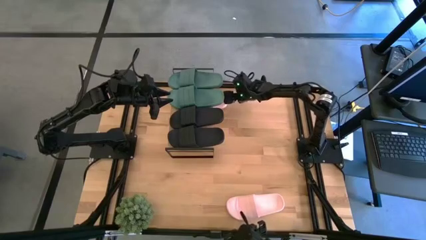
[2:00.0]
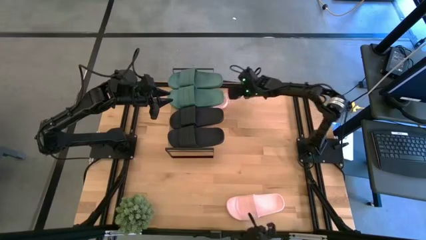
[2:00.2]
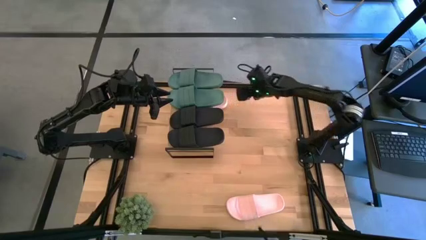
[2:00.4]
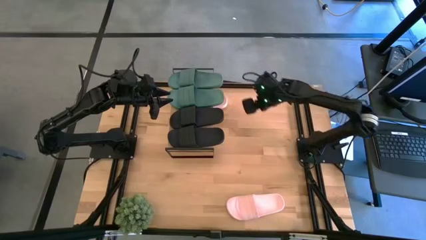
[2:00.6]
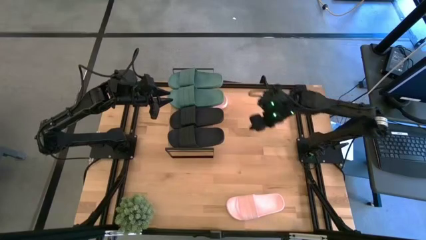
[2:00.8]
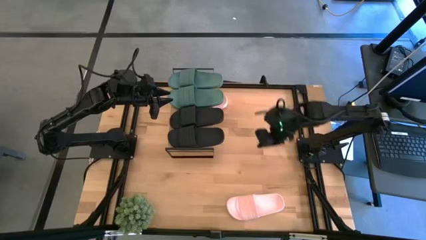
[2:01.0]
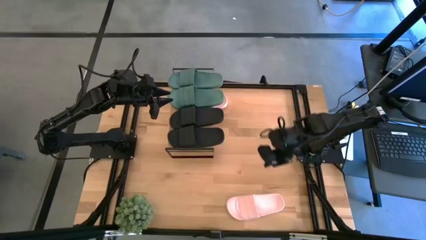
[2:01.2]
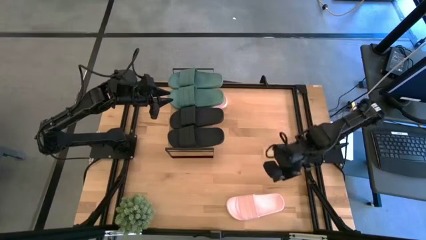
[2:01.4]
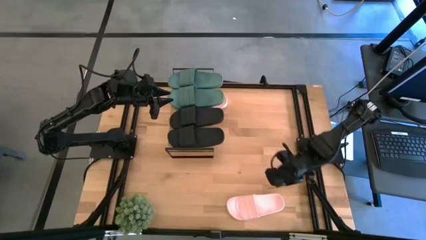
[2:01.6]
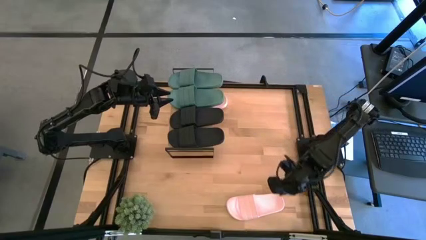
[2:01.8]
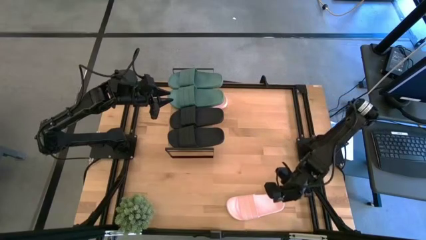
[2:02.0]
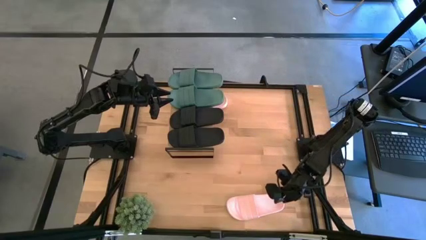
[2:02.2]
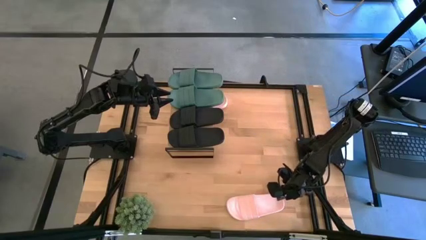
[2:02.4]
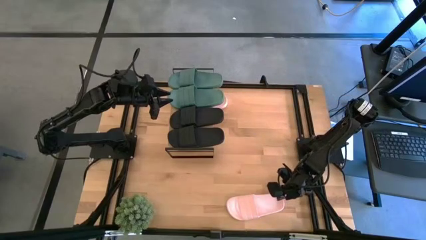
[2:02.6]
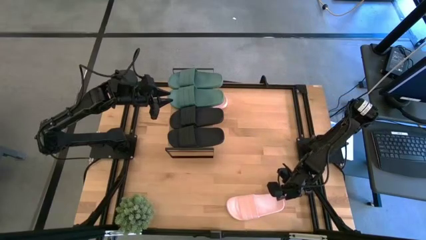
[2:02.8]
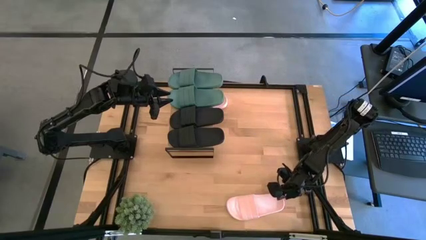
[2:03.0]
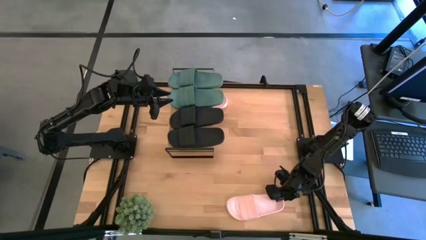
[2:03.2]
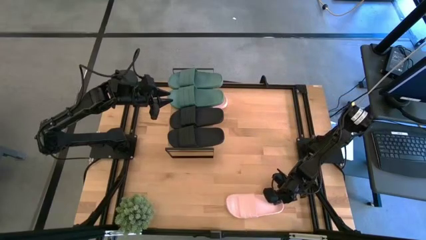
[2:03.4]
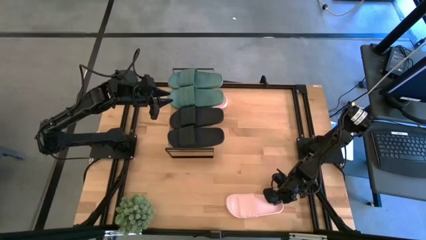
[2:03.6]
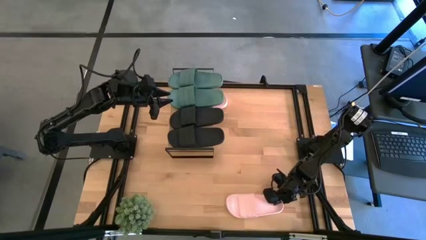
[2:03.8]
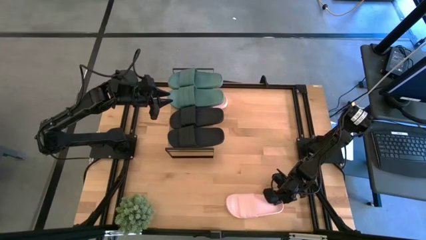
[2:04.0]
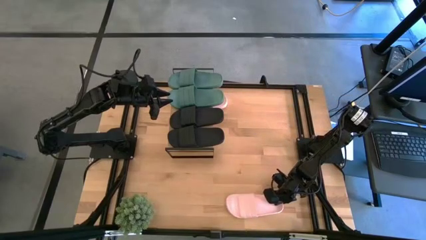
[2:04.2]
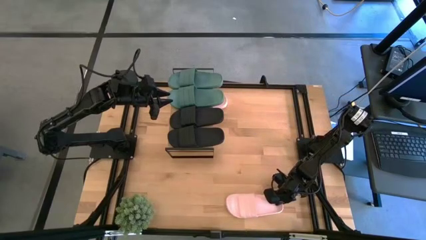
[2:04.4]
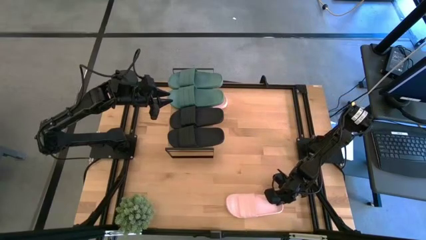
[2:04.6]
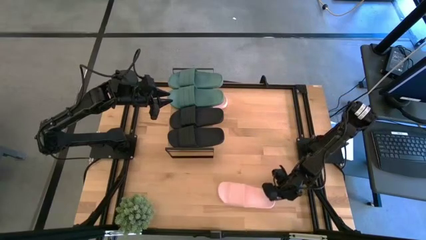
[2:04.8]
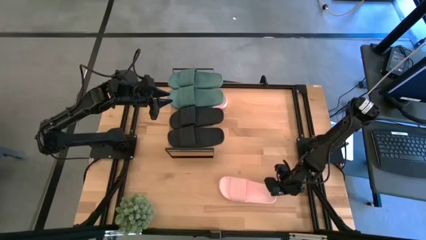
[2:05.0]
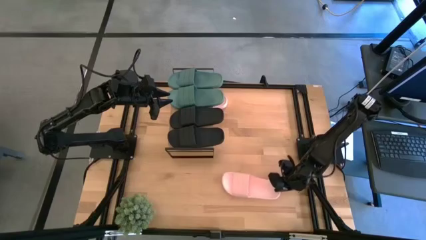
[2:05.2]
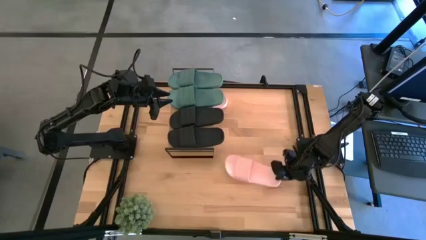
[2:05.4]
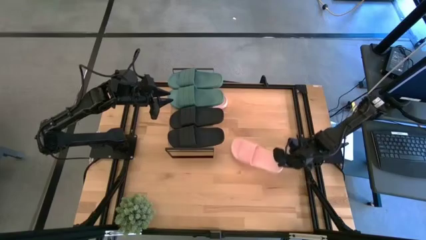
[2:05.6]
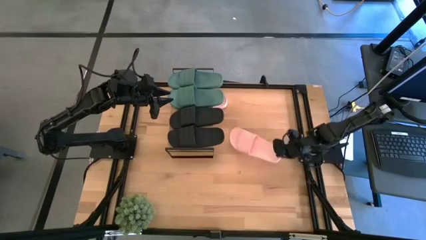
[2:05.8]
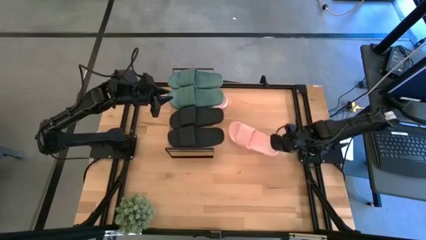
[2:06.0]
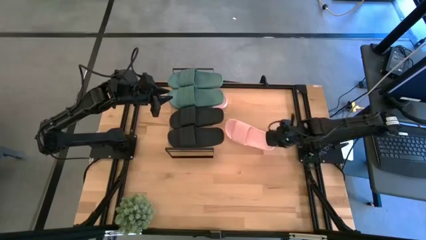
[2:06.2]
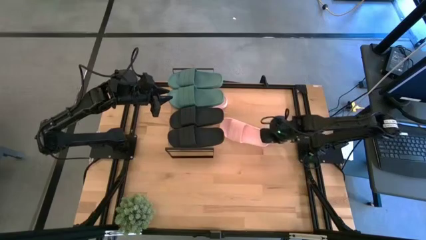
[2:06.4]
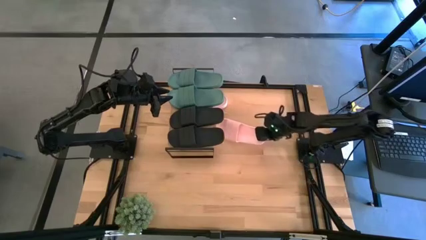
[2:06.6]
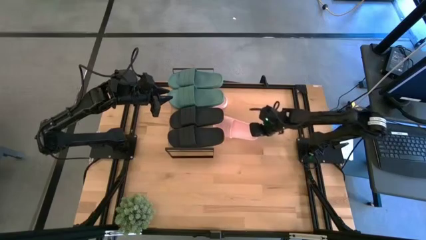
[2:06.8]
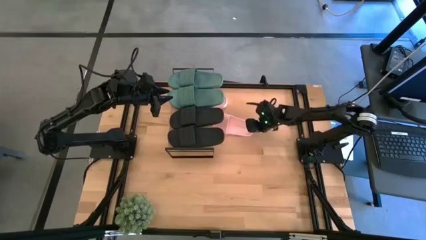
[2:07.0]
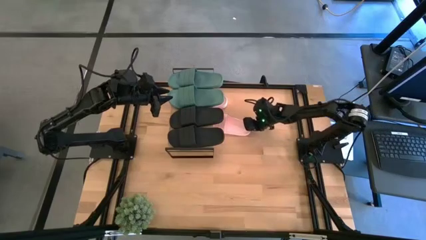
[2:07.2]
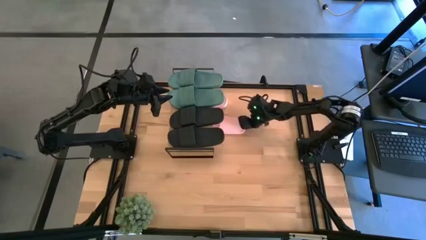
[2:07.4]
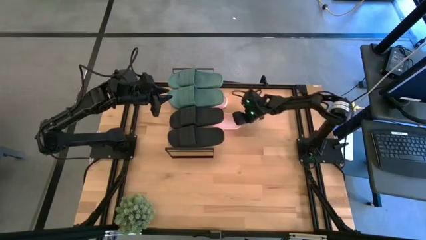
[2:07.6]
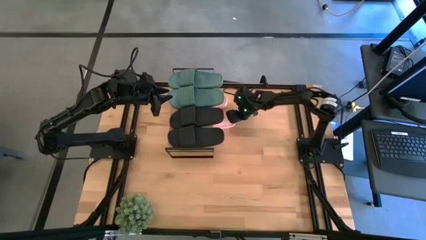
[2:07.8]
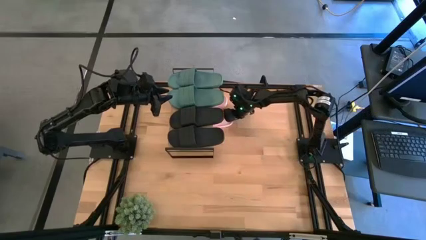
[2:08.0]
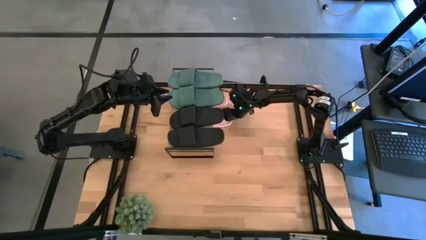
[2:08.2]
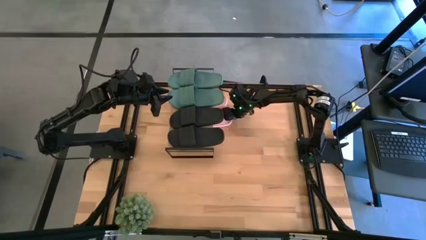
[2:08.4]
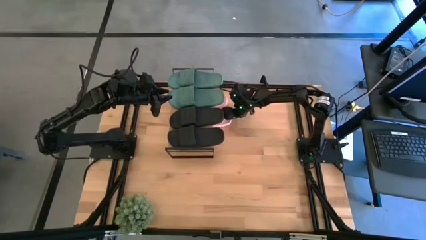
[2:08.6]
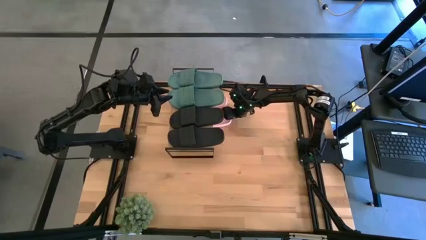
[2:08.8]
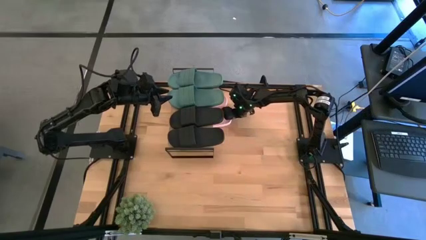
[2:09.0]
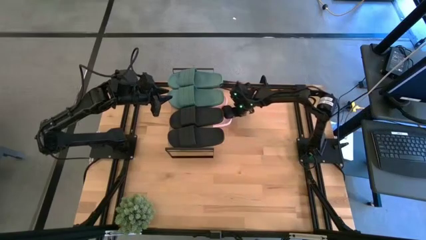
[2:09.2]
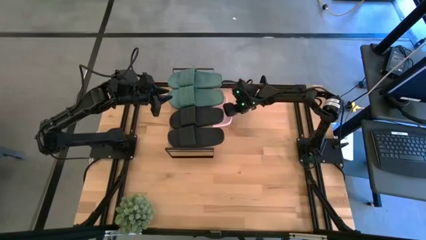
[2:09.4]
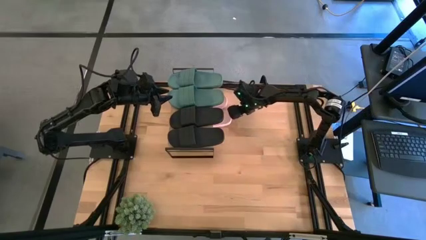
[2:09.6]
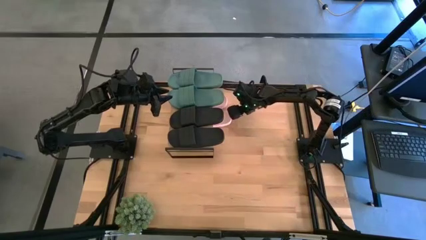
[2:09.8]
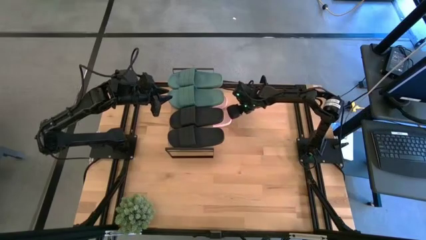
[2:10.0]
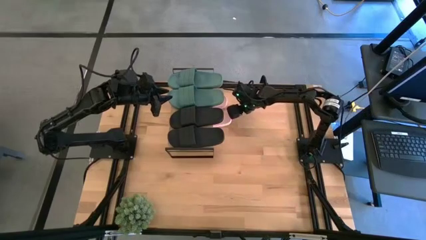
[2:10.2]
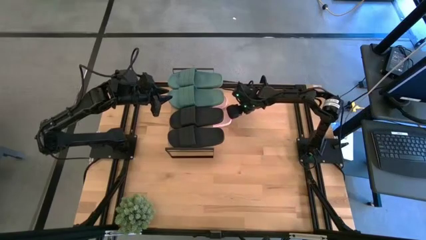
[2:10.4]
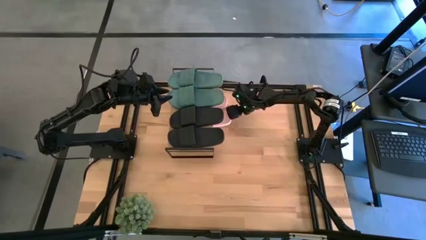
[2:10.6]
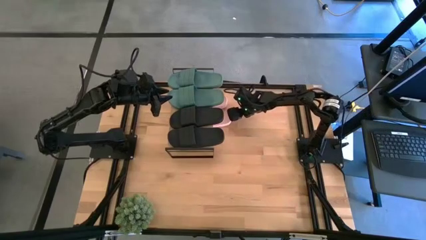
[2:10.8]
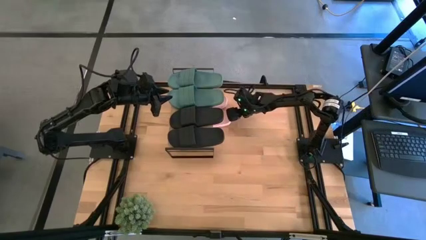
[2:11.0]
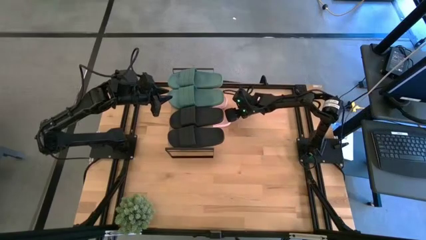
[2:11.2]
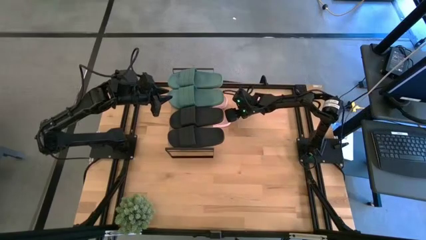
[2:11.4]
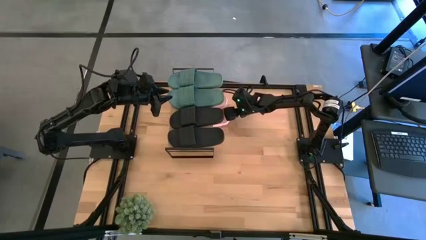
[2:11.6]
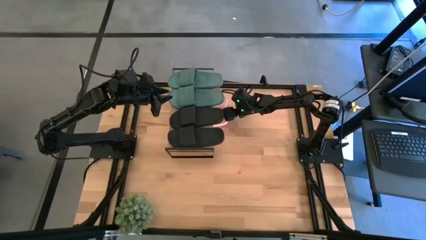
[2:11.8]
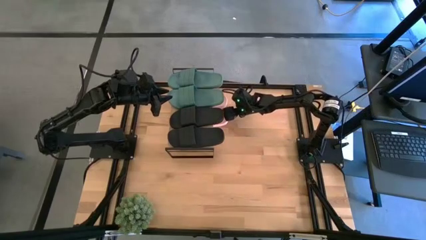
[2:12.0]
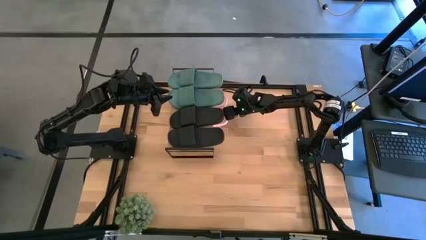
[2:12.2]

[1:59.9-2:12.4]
Task: Pick and place slides into the shelf
Put the pink slipper underneath the shelf

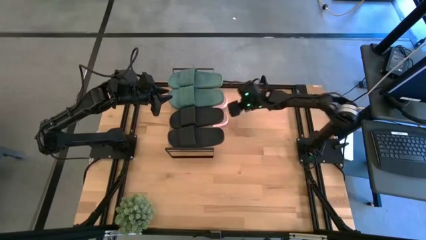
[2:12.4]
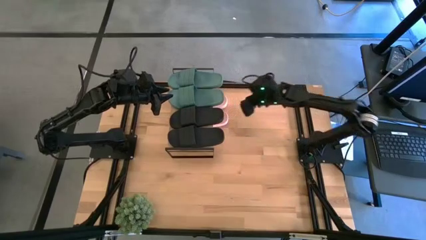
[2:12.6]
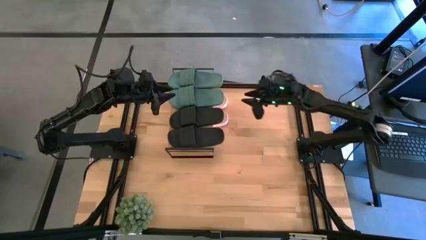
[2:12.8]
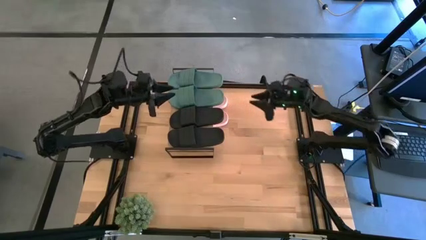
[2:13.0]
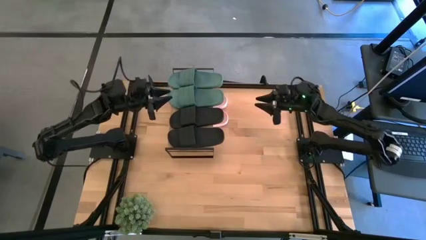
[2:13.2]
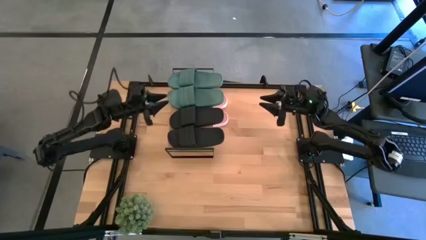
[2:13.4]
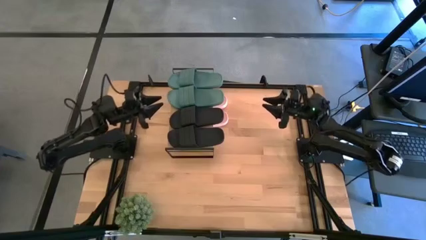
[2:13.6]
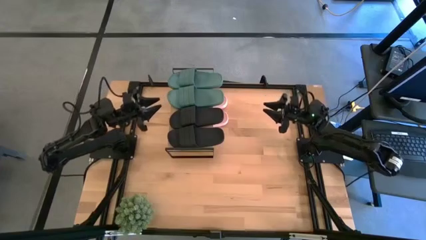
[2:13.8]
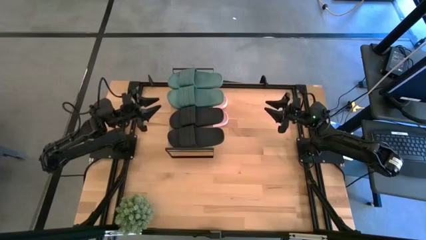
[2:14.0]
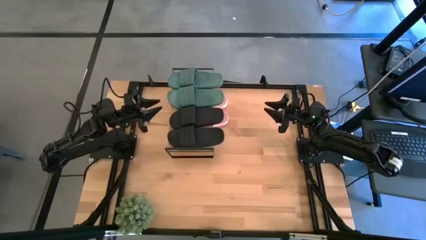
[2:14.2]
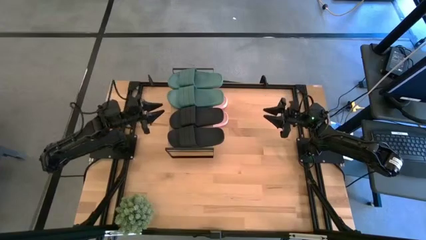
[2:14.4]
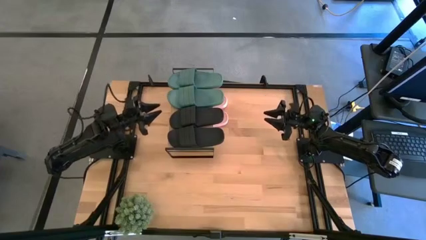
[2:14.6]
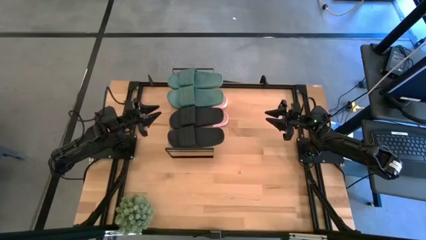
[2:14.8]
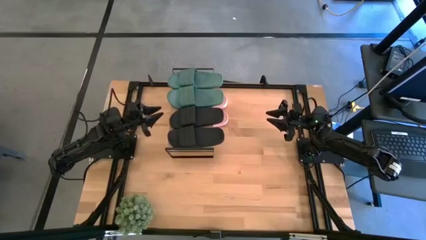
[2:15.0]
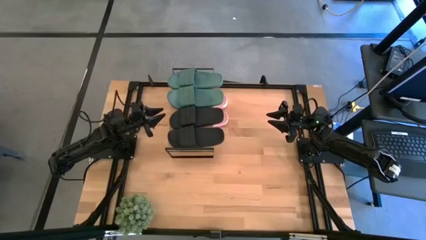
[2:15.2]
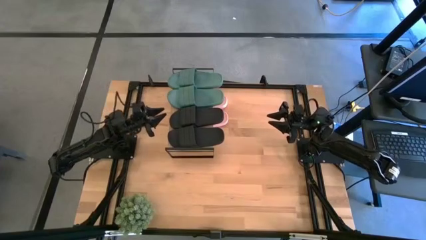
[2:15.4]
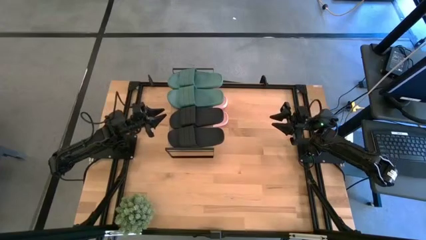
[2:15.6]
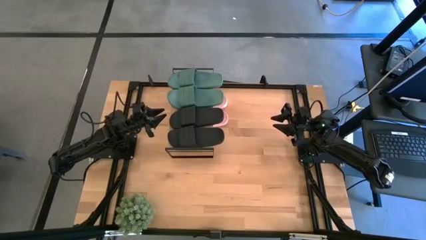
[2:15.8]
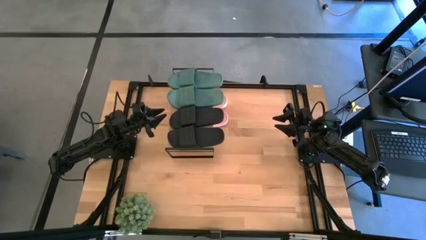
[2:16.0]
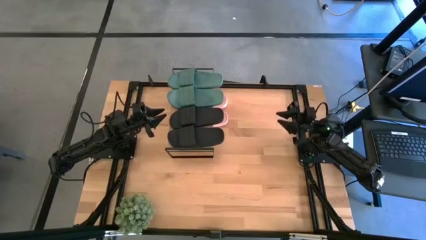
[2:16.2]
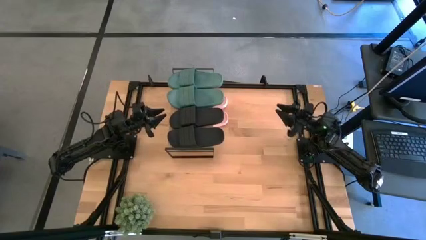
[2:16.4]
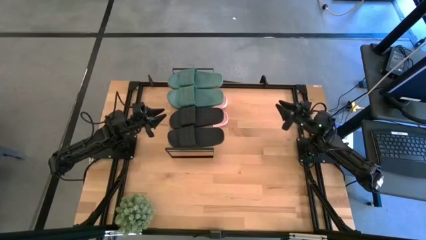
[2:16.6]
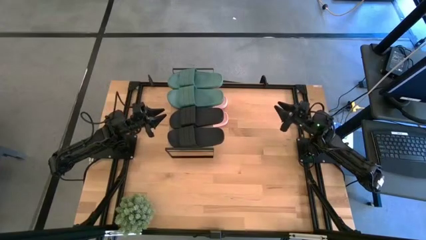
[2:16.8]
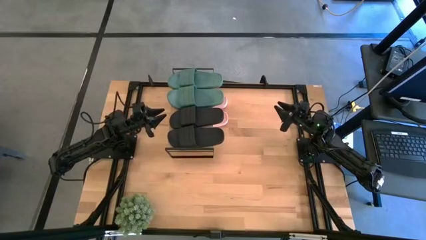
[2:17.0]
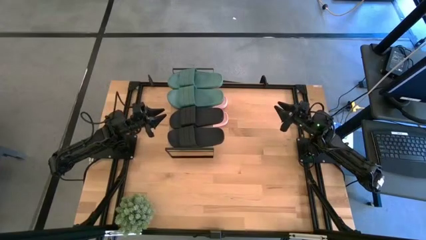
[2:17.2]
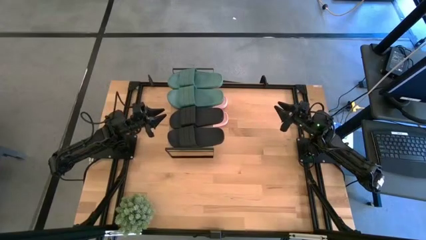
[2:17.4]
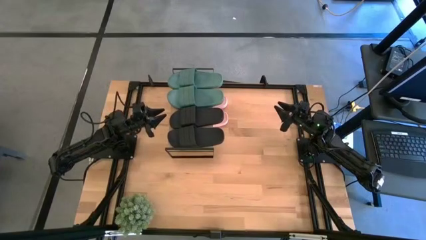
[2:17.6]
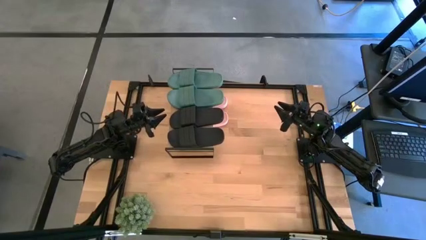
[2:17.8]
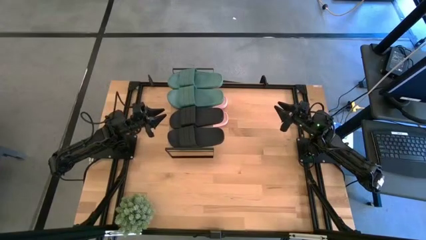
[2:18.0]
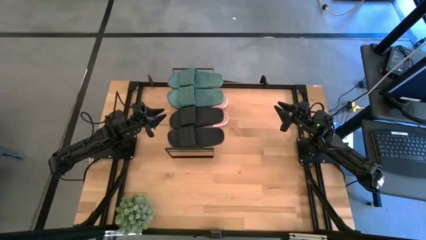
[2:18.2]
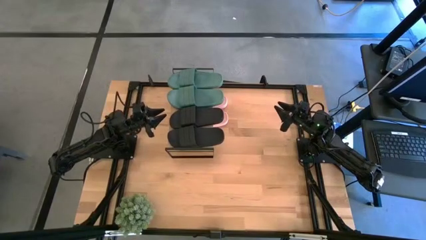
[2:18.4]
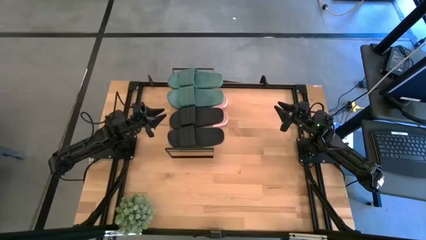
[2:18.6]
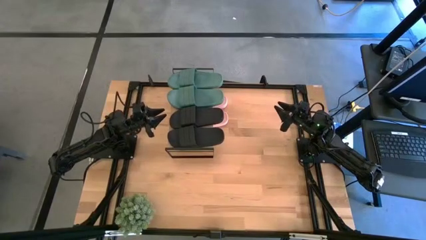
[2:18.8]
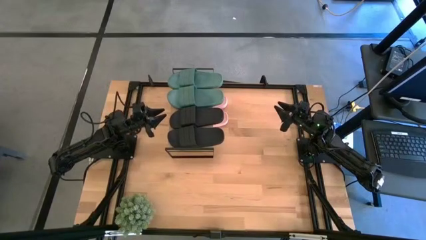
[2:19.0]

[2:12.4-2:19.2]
Return to home position
